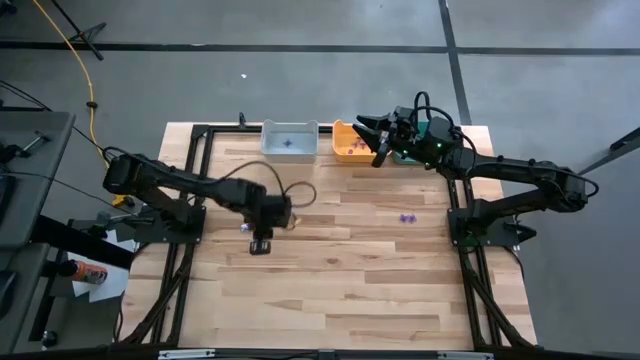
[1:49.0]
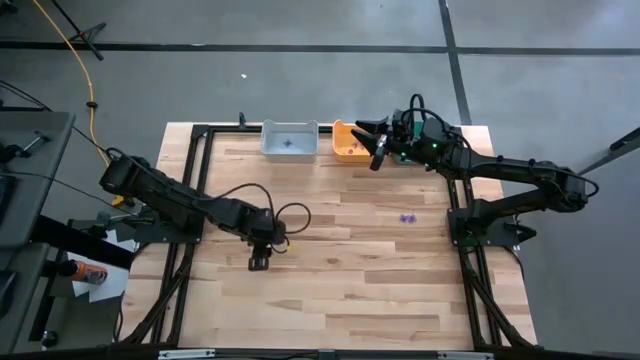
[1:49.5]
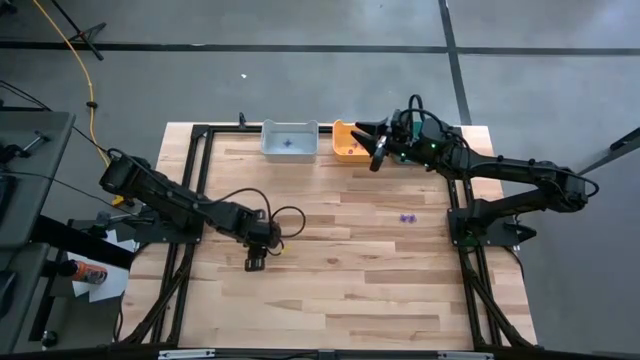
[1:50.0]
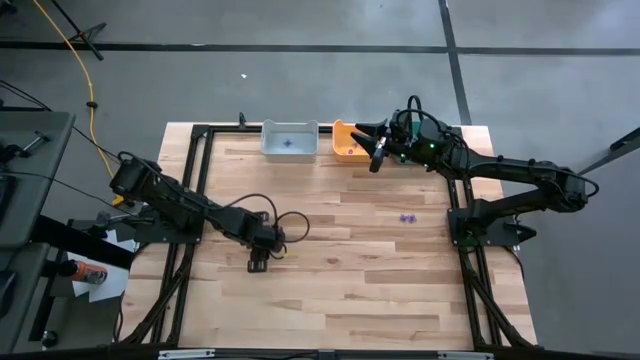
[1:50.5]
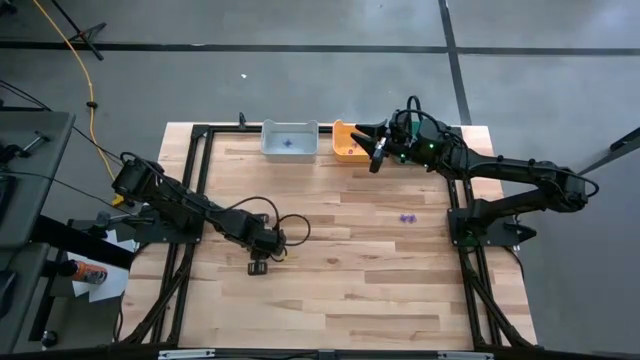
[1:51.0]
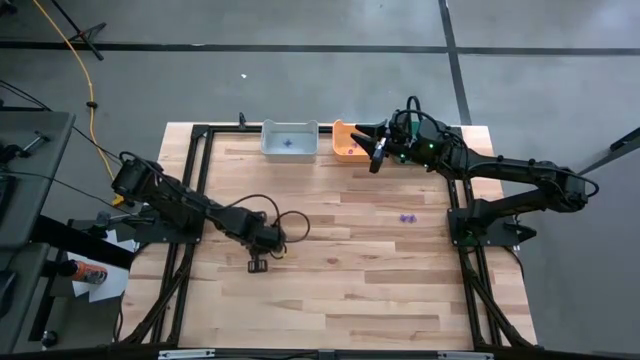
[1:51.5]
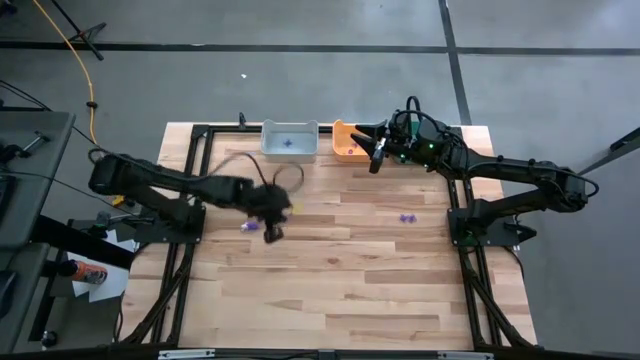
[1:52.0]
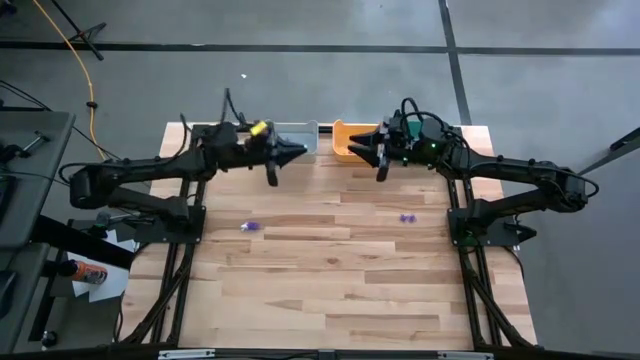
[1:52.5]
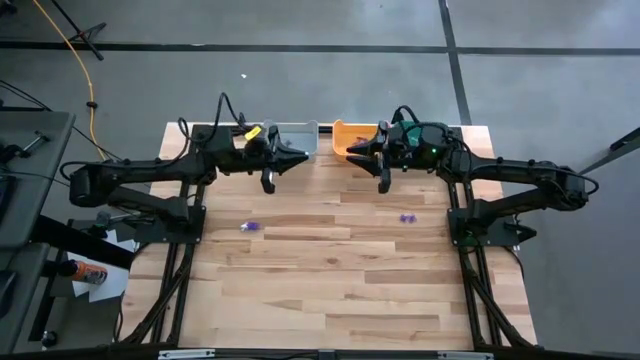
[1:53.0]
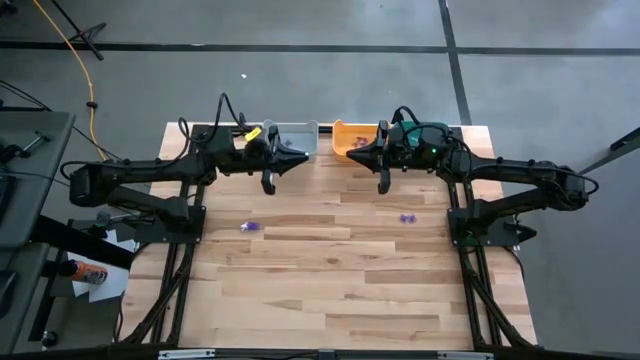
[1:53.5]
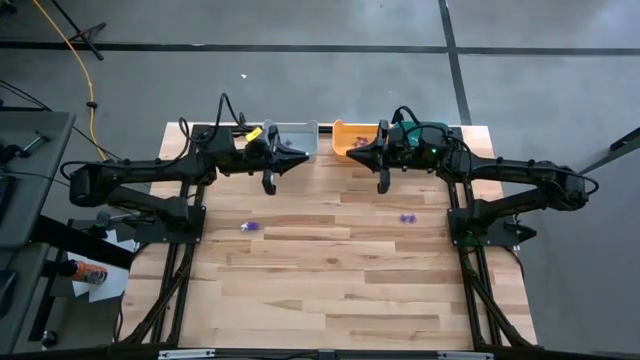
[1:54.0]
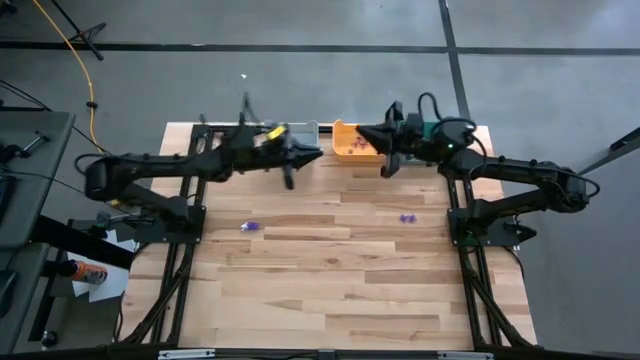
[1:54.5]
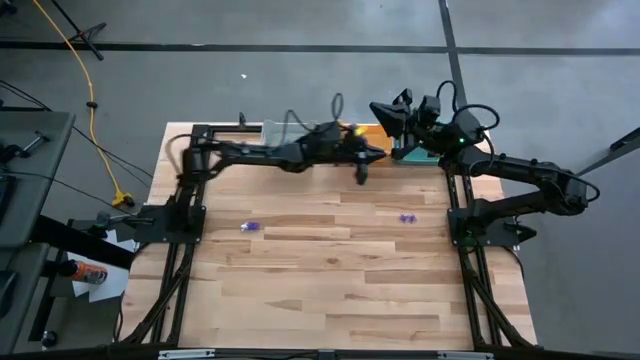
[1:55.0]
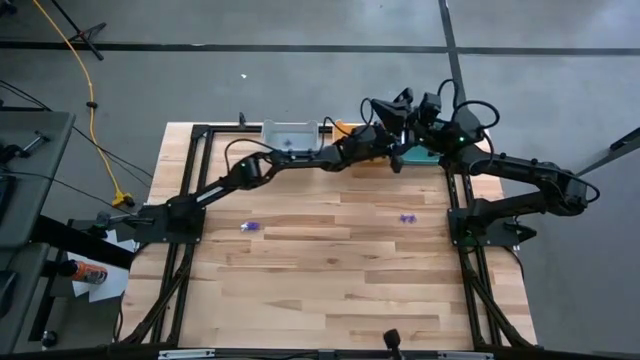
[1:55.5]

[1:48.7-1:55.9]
Task: Sort Halloween decoration
Put the white bone toy into the green bin

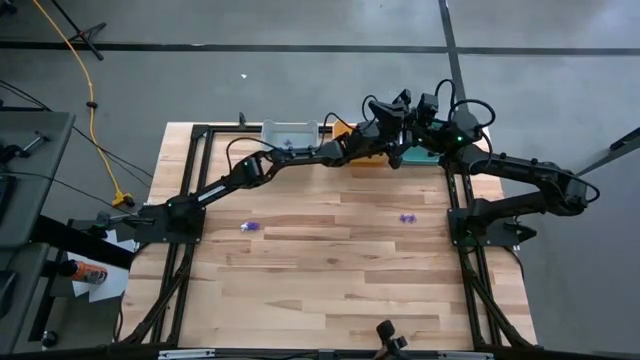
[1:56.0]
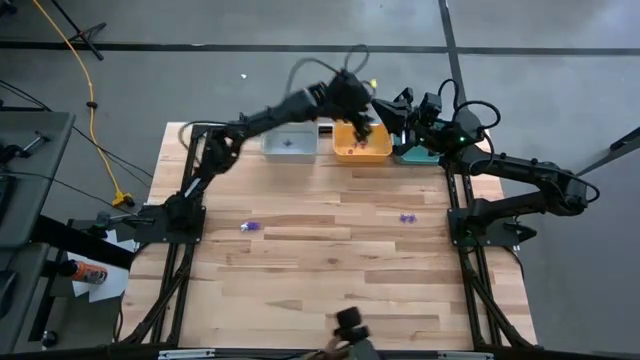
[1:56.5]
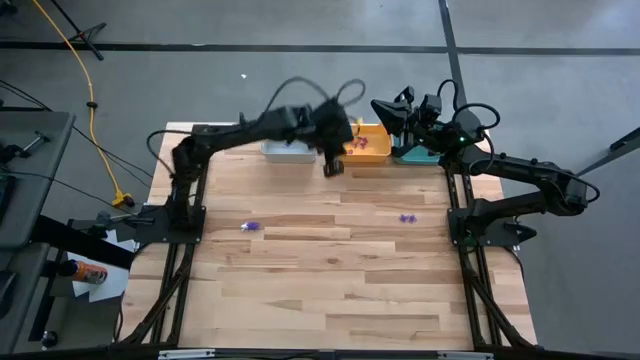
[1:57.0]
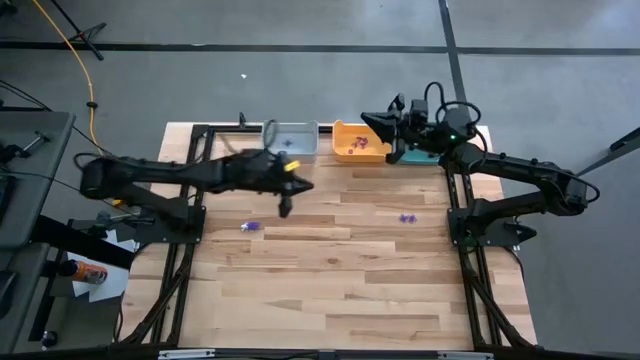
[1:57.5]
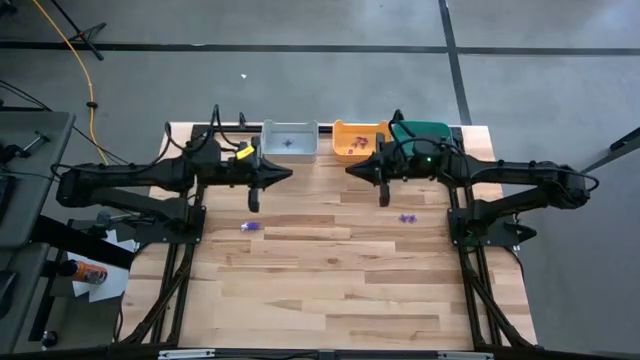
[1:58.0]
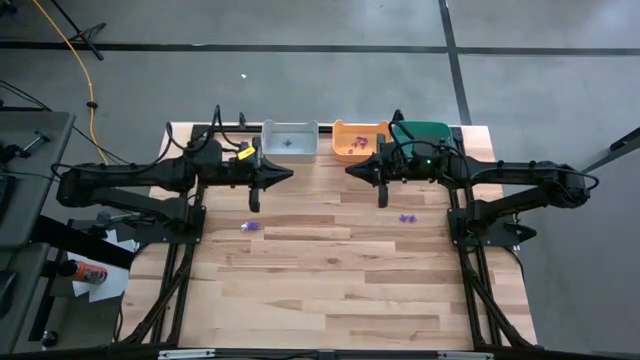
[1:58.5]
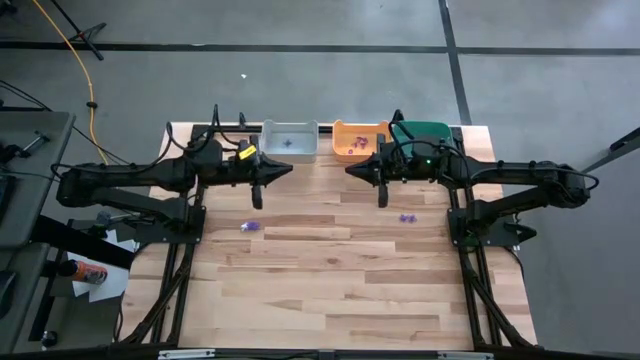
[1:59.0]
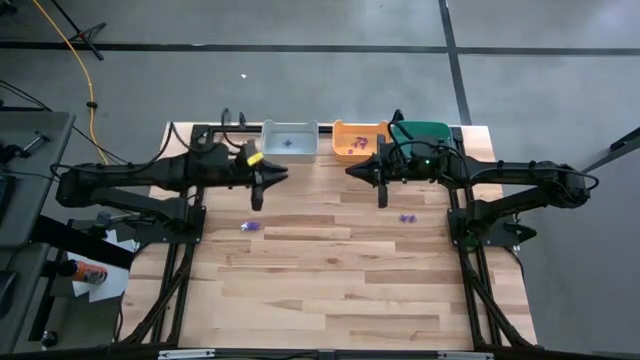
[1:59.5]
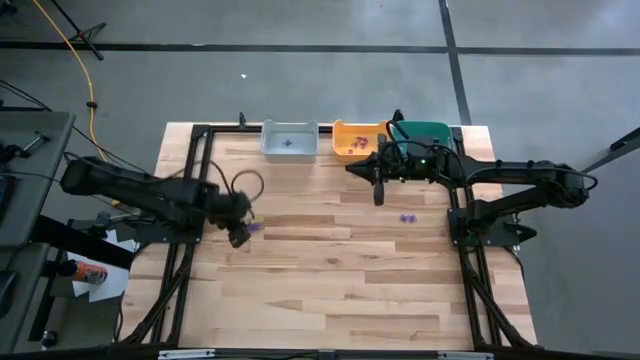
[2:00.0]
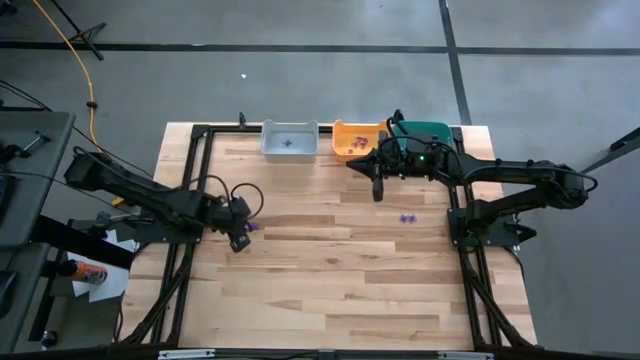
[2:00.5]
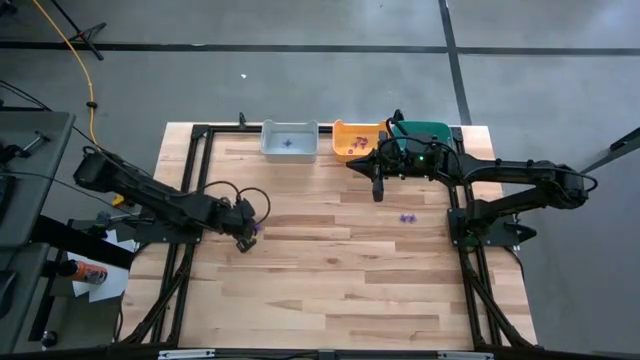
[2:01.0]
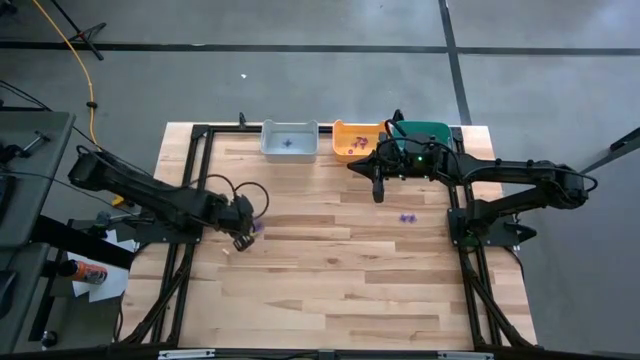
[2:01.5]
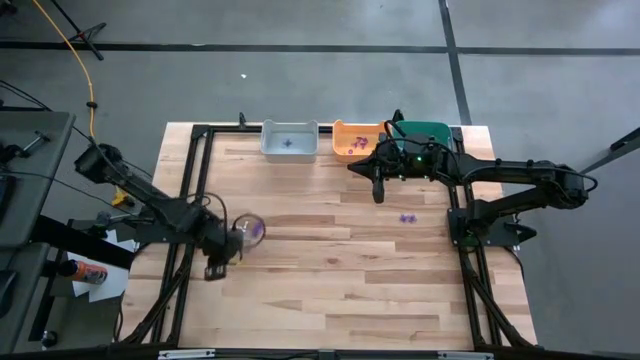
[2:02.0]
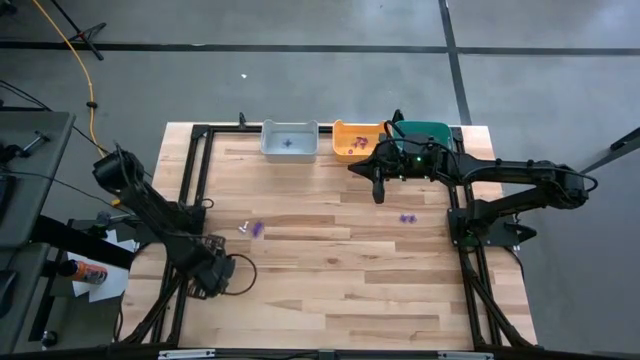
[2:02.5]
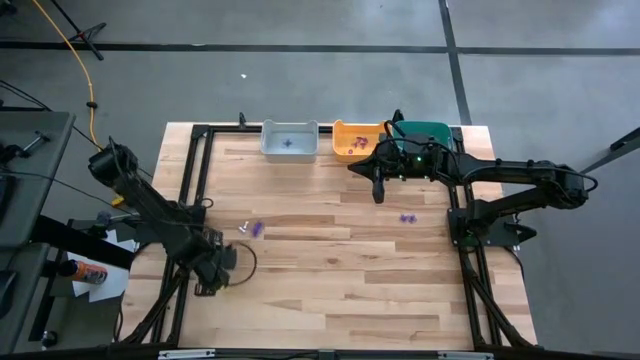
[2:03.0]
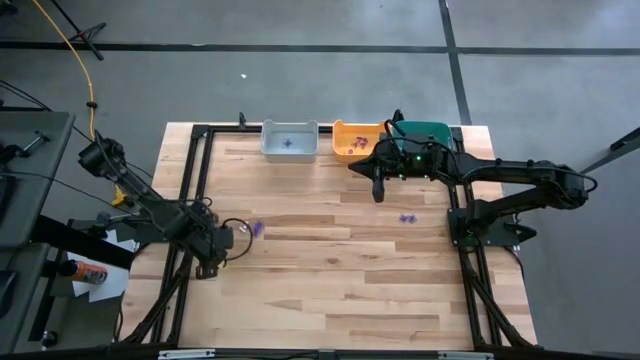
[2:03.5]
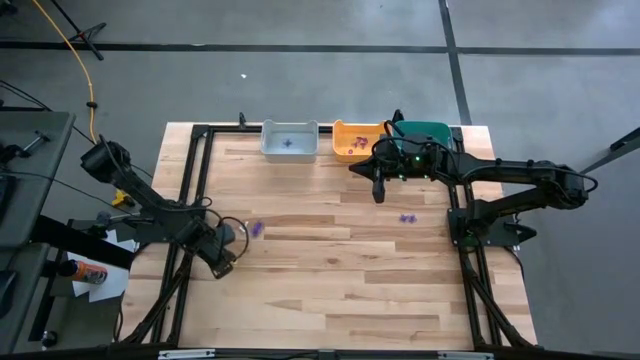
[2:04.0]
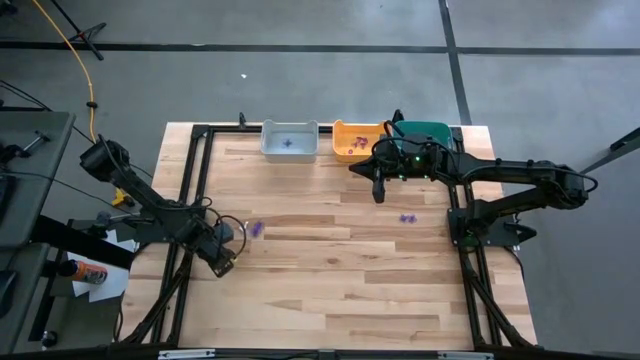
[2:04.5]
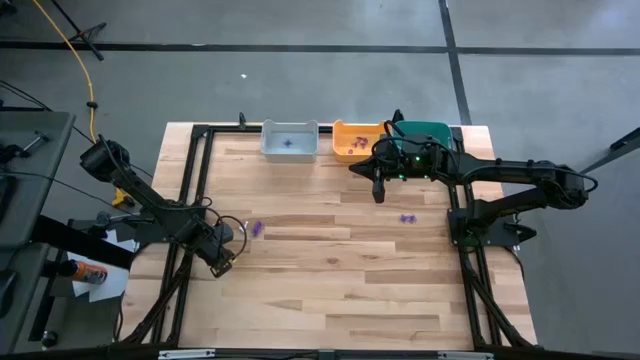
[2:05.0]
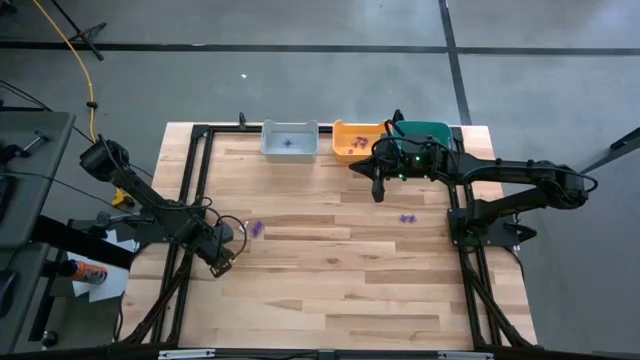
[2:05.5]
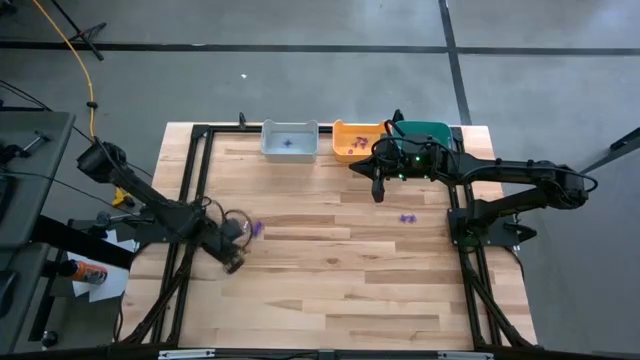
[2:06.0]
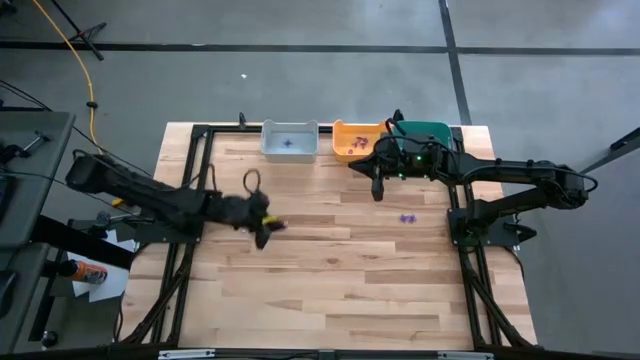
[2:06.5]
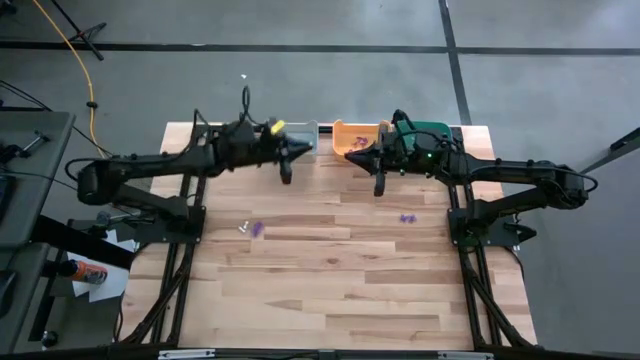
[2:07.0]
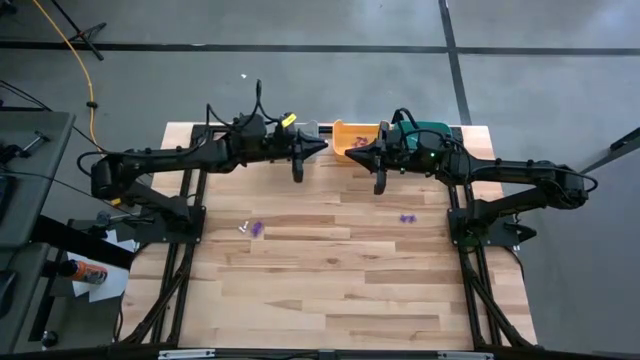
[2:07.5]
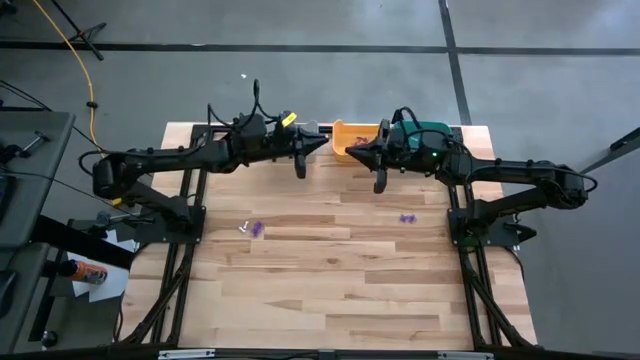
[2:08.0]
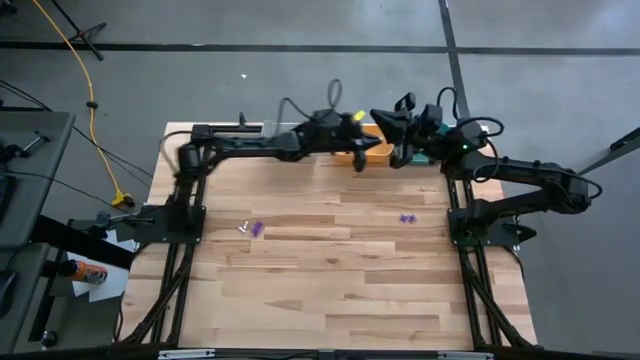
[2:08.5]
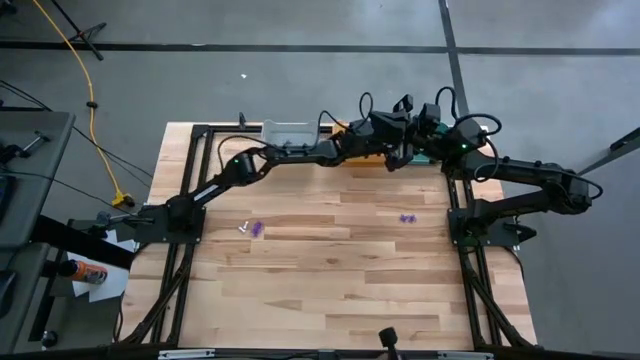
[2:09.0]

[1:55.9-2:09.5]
Put the white bone toy into the green bin
